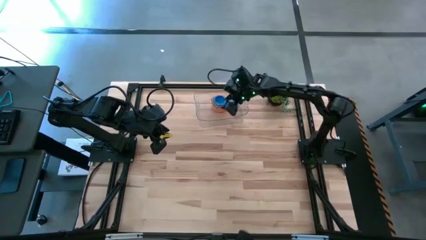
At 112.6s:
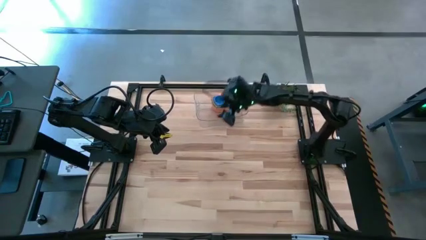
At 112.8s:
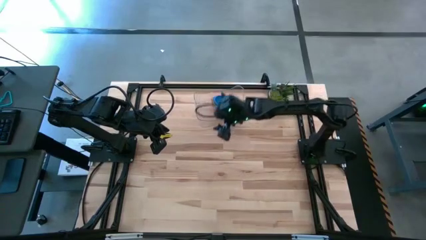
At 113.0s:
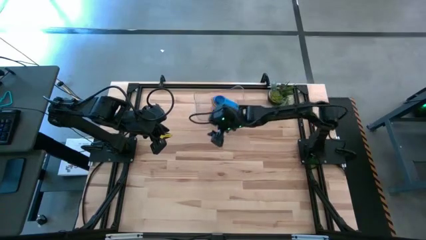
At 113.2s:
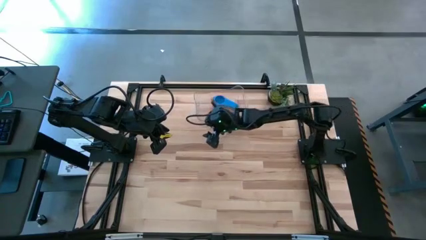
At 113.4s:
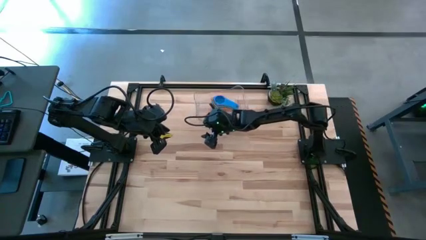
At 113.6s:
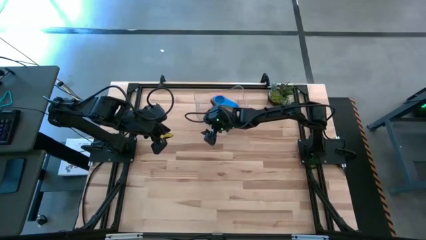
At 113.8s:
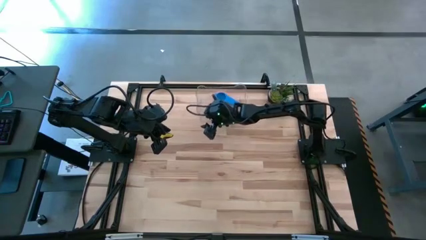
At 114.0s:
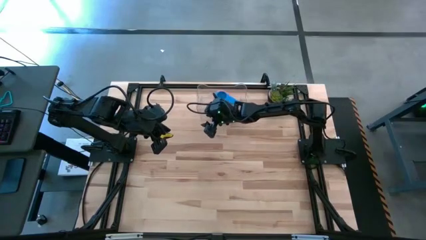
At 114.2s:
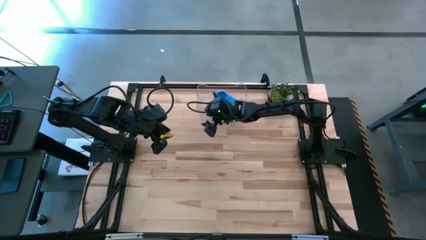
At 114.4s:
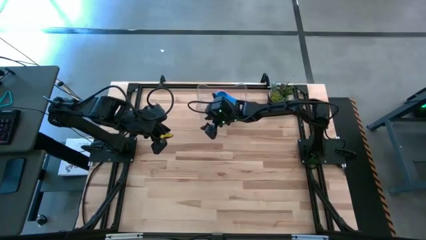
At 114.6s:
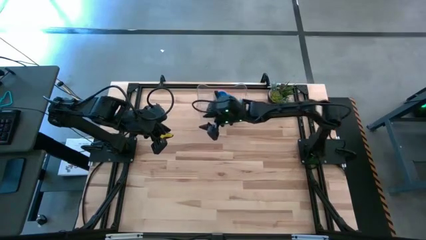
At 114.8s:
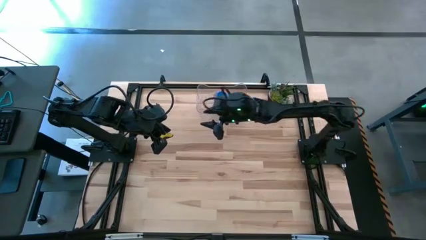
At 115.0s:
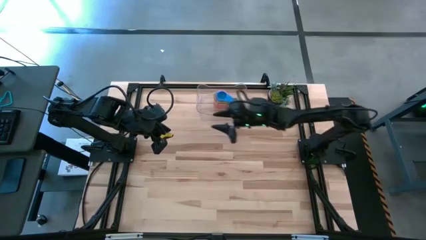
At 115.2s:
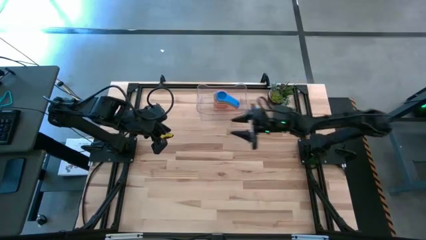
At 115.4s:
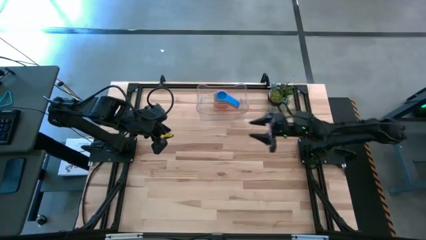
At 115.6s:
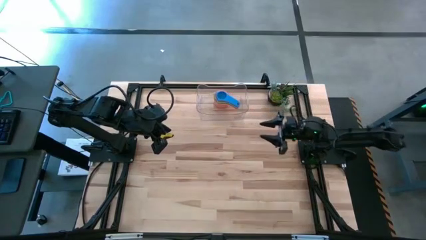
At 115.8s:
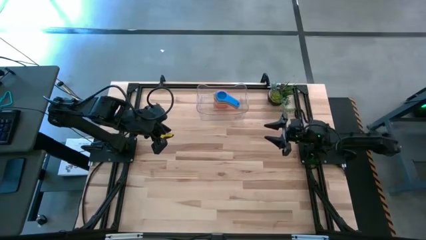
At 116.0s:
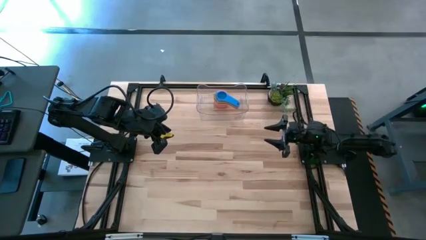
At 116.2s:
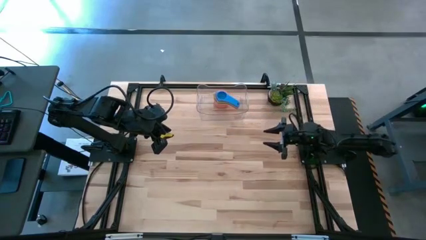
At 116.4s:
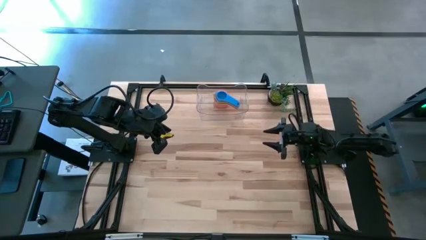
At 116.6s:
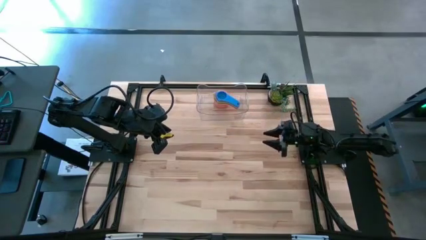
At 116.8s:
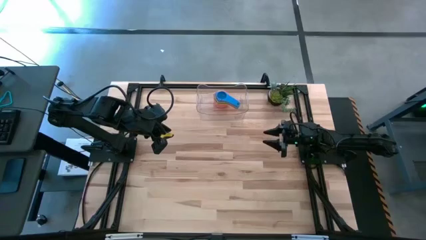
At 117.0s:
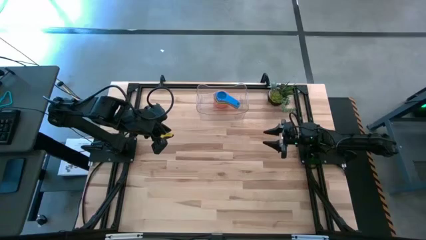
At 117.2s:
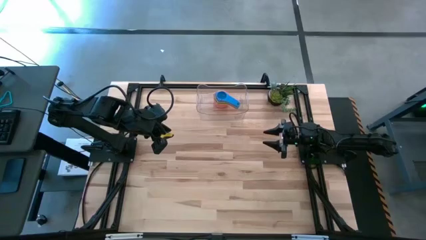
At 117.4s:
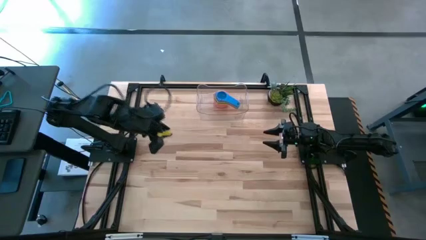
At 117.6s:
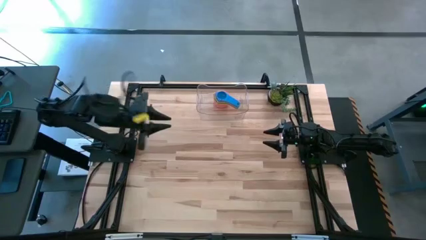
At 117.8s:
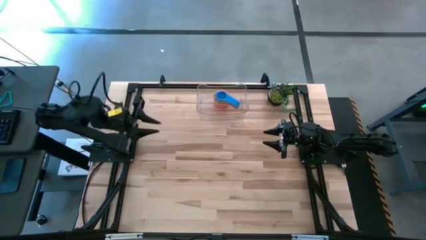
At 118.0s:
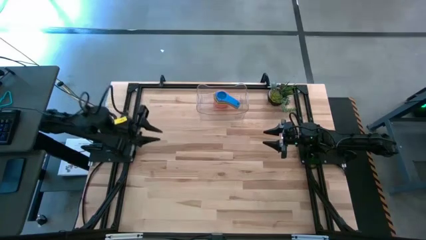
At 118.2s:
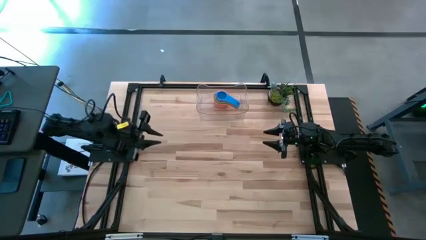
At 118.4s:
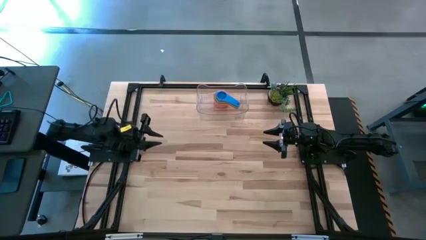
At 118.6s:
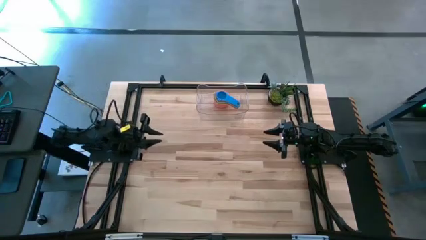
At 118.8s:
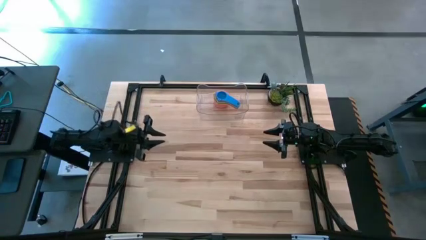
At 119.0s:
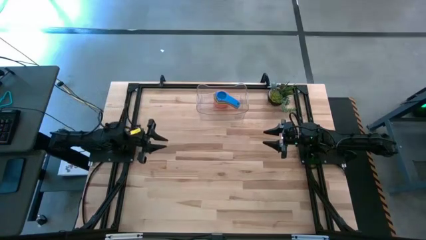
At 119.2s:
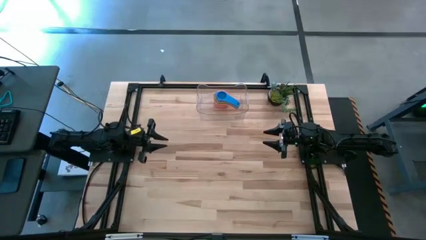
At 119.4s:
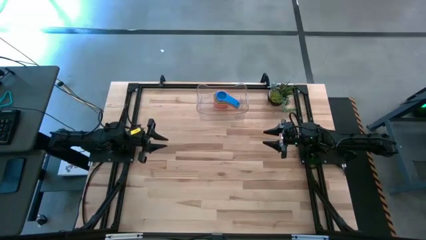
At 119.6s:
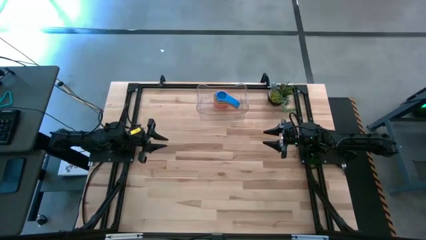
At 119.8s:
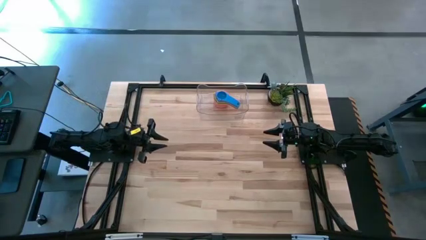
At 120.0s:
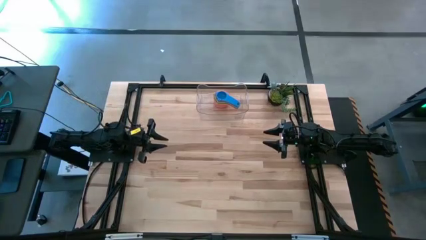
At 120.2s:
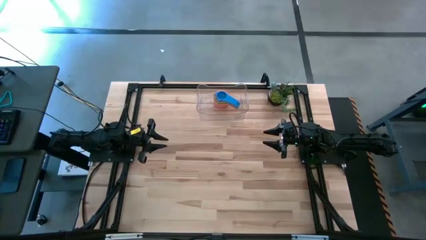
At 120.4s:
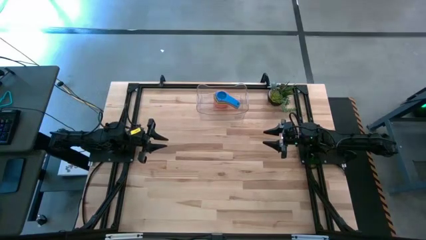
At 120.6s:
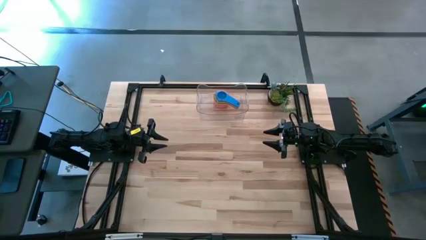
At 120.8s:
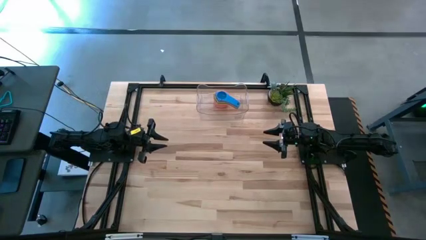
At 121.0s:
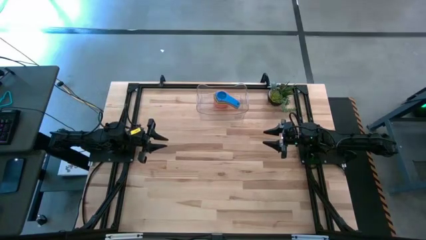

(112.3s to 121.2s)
Task: Nest measuring cups in basket
Return to Home Position

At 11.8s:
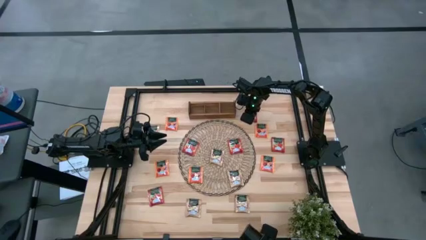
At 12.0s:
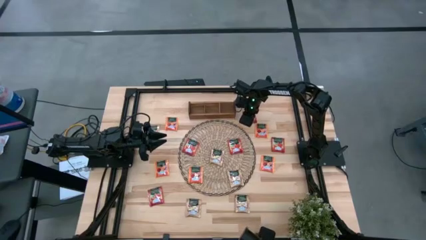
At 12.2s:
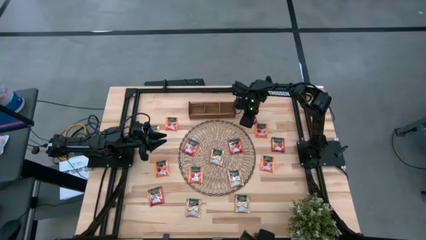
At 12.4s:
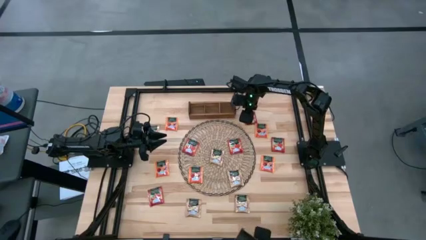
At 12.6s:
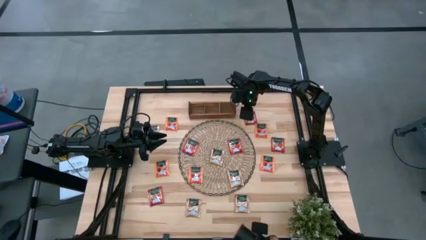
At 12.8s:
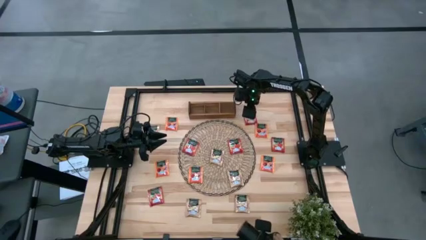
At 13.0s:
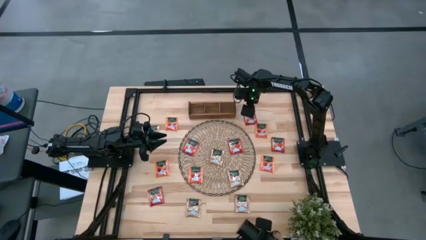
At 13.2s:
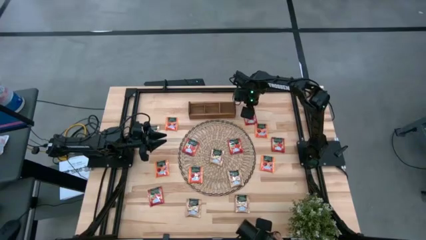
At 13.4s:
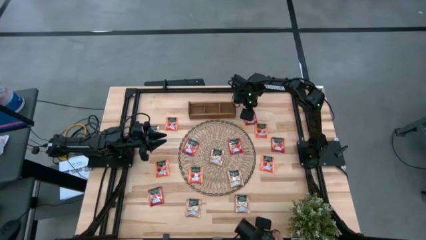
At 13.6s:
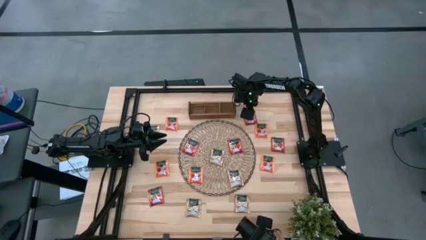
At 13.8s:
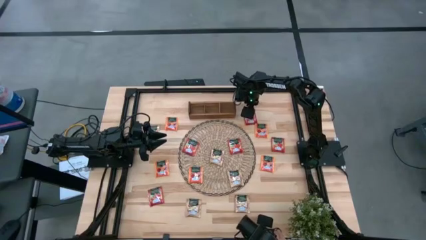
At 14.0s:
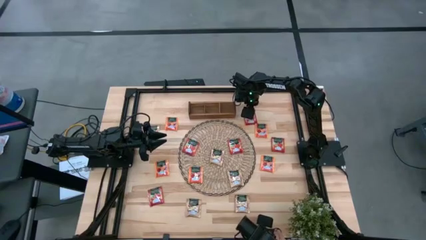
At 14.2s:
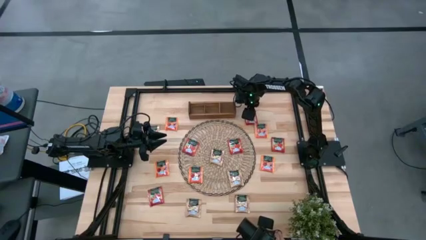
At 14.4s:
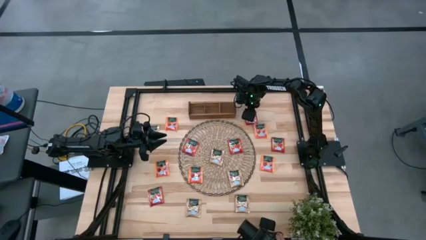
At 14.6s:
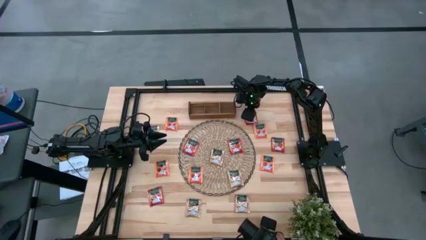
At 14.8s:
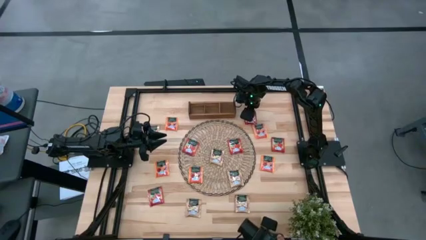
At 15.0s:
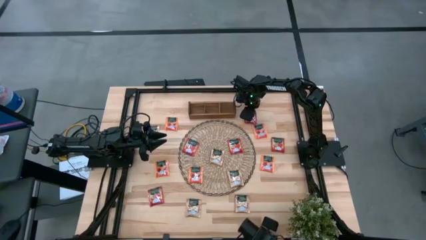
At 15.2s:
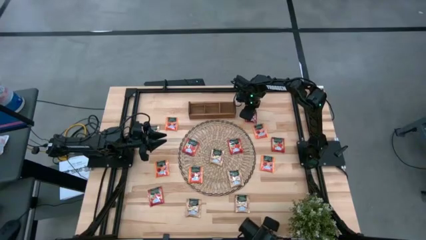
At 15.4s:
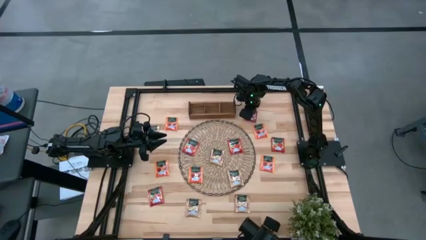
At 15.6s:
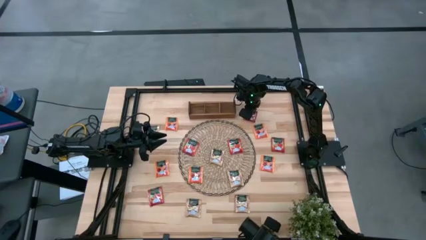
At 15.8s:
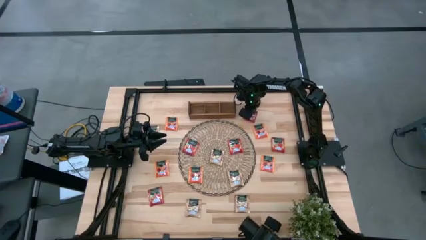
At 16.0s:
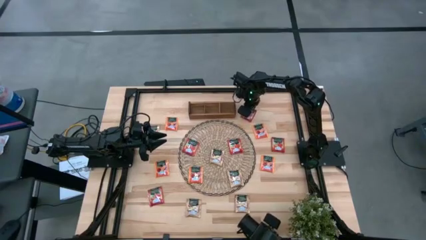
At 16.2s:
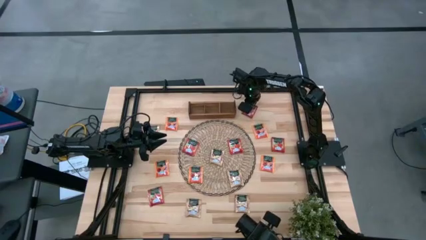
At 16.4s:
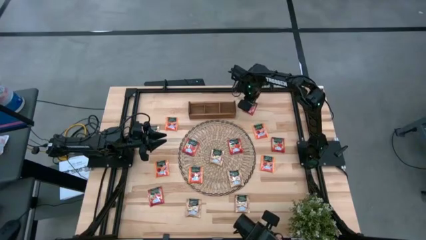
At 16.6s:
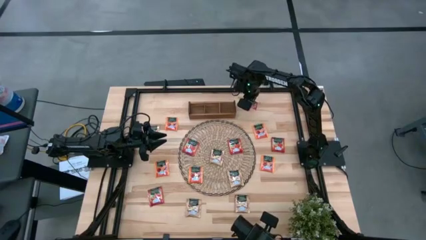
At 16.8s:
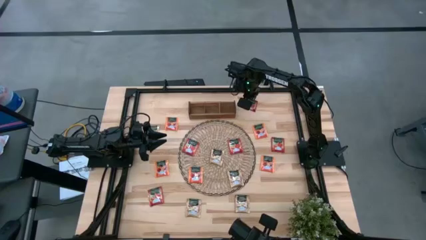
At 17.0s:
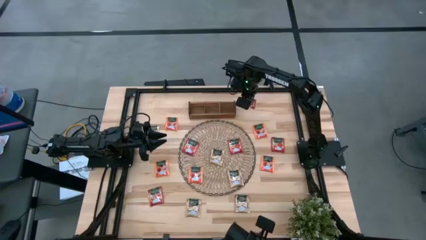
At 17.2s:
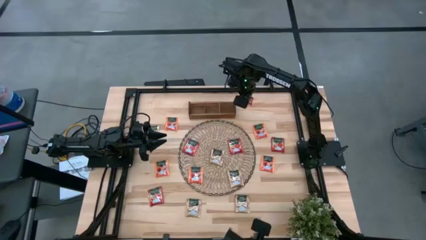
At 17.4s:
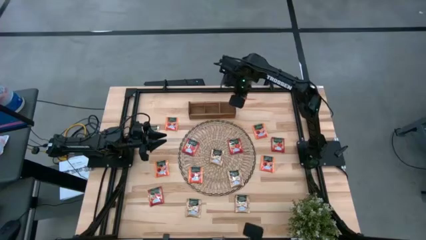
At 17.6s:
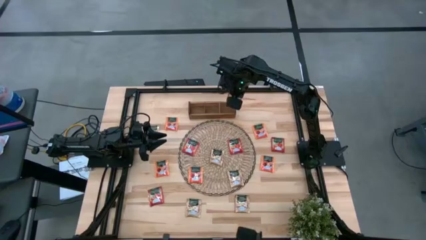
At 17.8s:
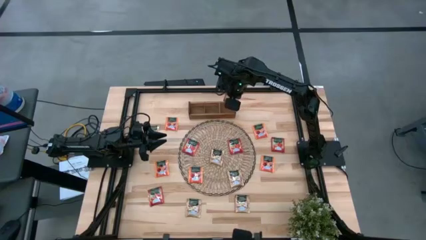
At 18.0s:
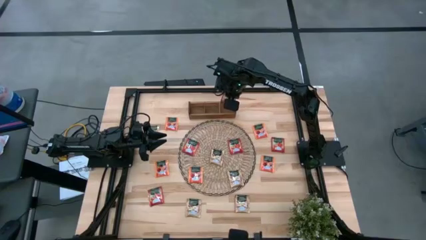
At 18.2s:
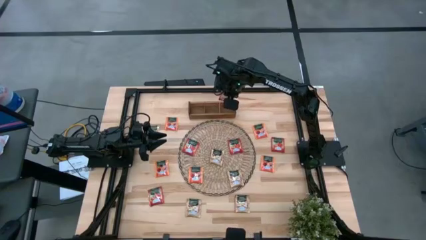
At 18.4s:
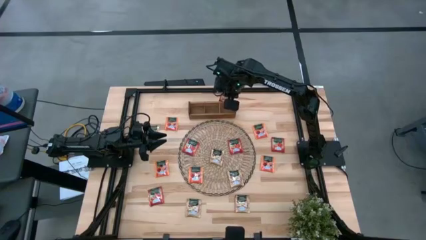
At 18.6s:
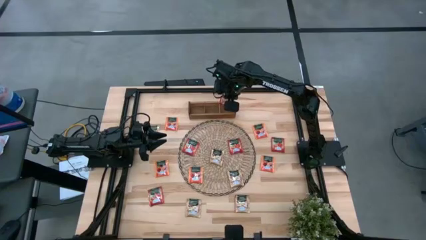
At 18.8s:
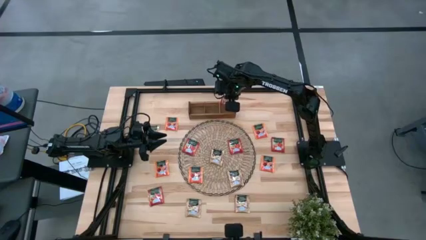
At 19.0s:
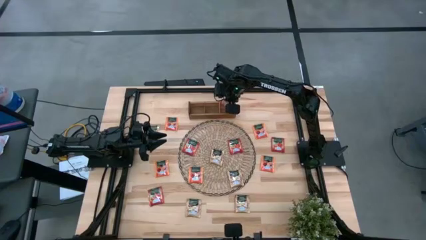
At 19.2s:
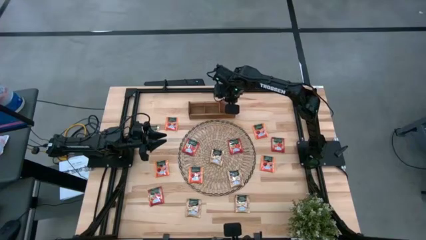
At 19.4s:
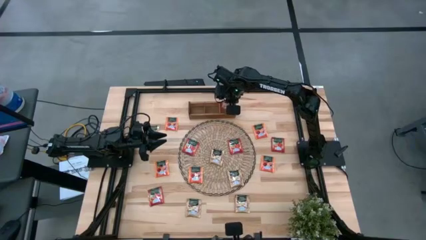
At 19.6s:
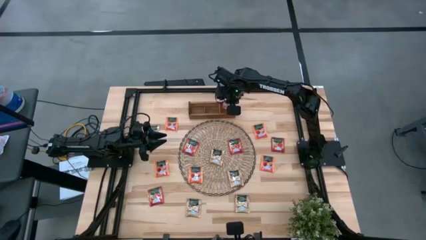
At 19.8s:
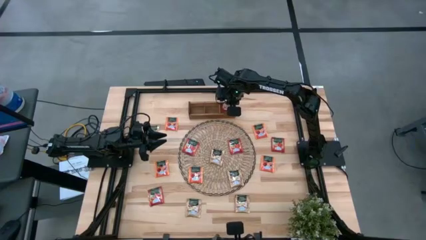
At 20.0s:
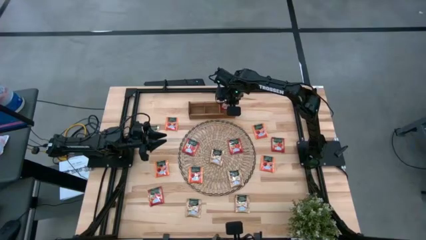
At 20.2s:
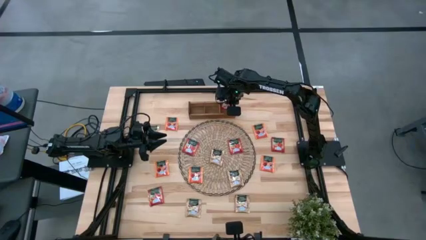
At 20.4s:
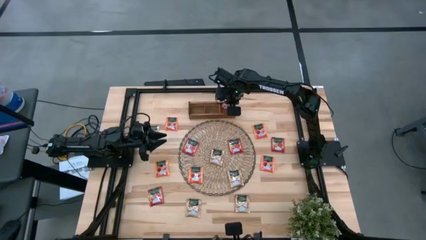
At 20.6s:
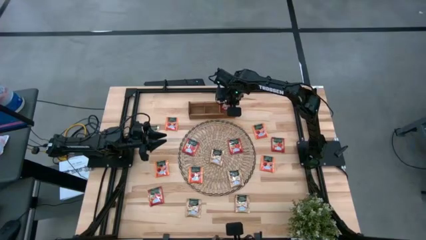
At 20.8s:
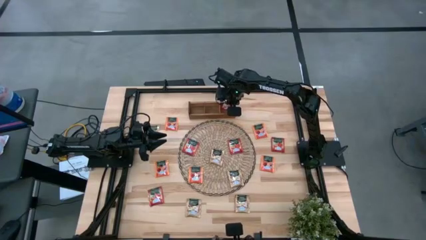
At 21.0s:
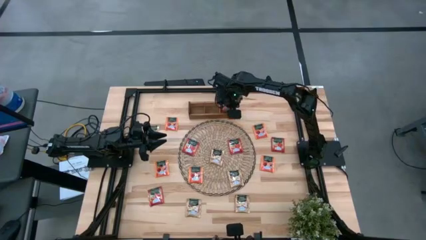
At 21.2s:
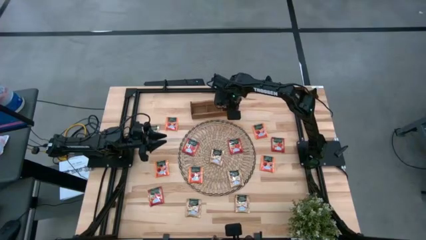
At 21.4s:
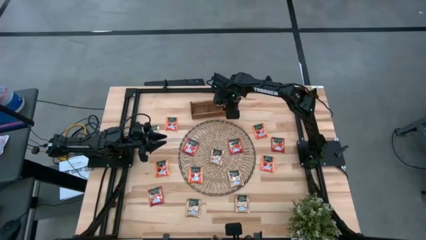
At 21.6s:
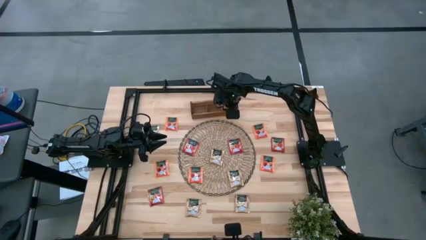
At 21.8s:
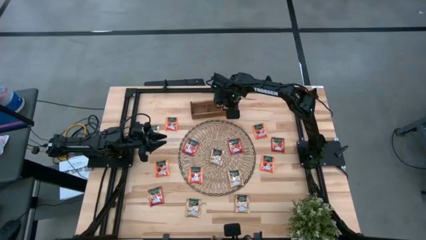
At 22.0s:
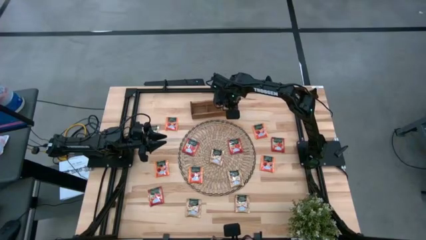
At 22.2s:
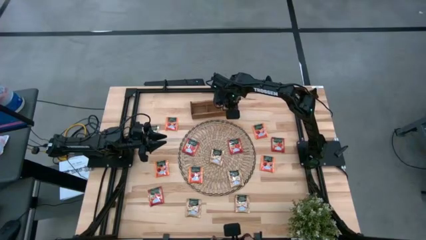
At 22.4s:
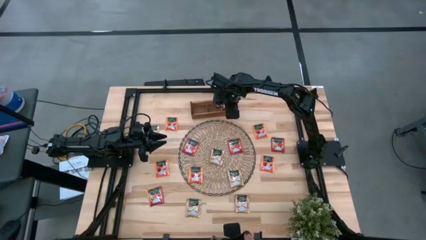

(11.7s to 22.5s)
Task: Pick & Place Tea
Put the red tea bag into the right section of the wooden organizer
